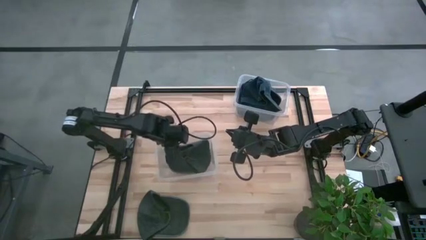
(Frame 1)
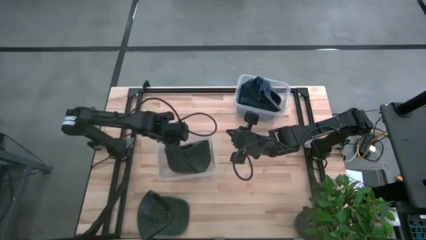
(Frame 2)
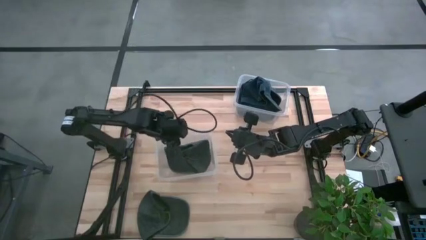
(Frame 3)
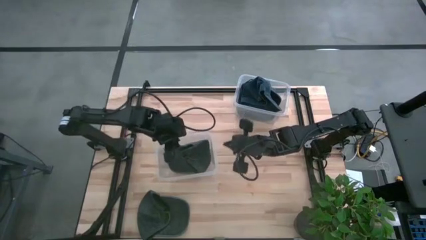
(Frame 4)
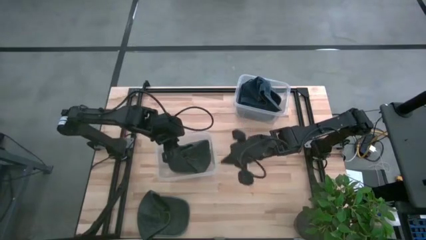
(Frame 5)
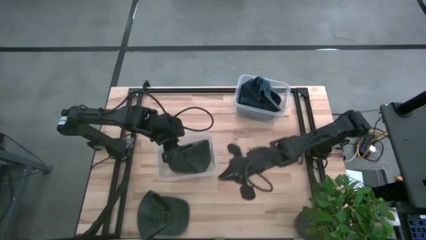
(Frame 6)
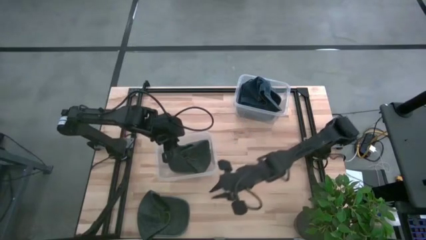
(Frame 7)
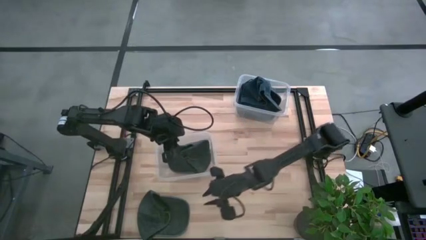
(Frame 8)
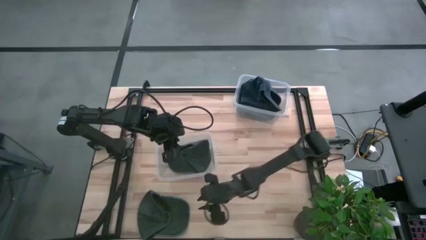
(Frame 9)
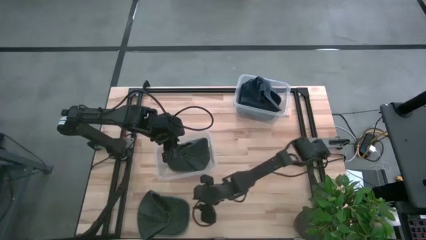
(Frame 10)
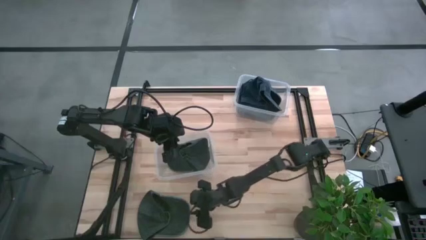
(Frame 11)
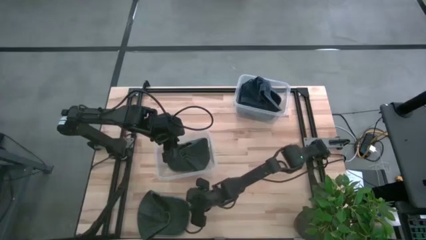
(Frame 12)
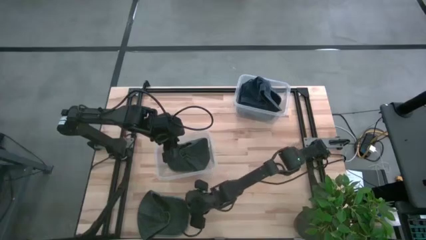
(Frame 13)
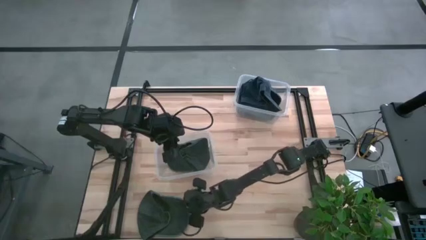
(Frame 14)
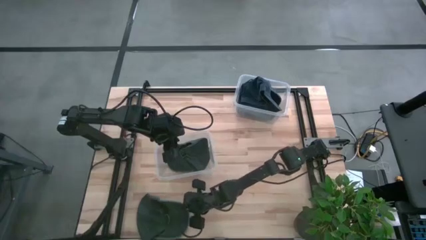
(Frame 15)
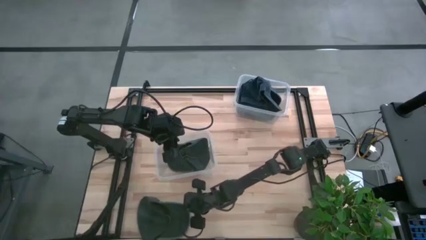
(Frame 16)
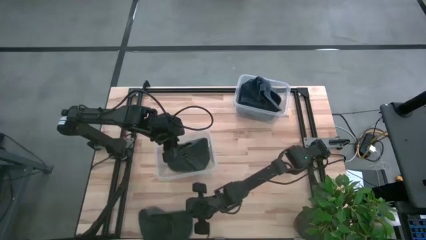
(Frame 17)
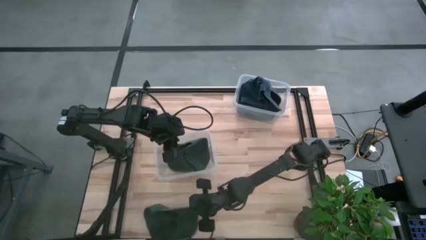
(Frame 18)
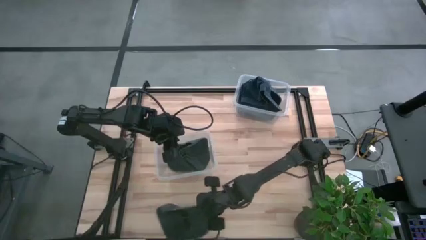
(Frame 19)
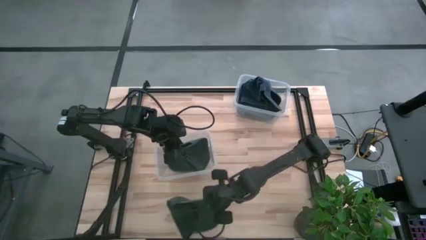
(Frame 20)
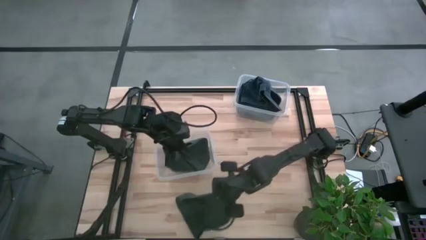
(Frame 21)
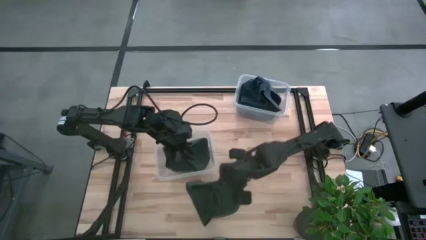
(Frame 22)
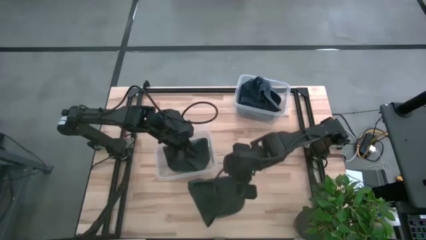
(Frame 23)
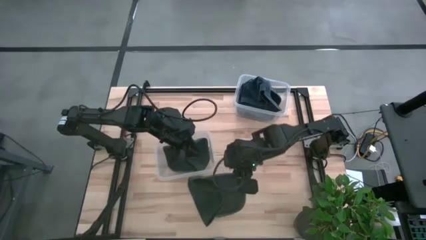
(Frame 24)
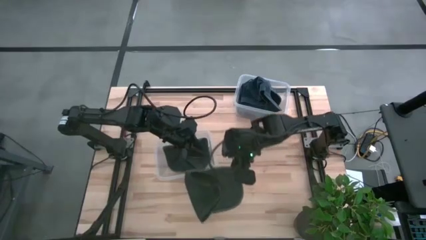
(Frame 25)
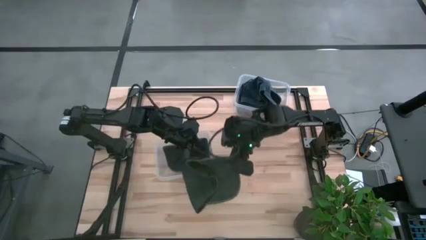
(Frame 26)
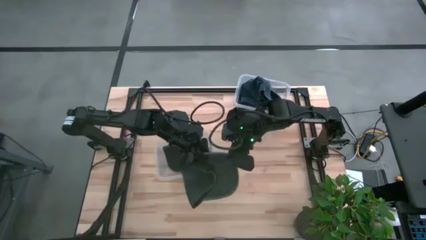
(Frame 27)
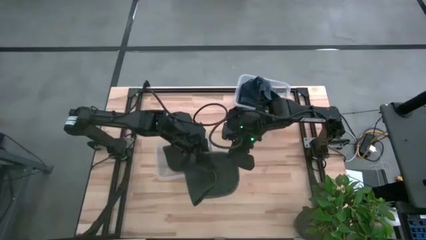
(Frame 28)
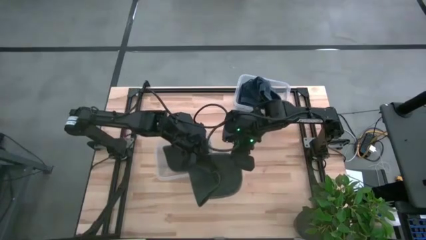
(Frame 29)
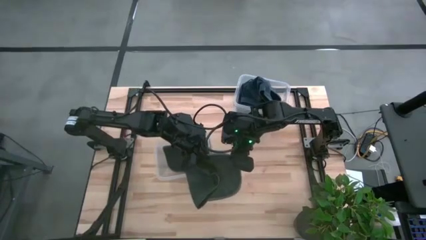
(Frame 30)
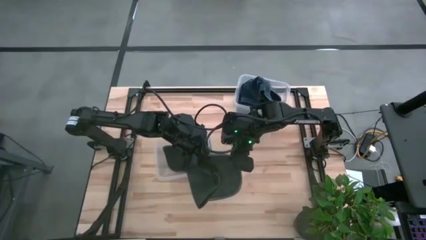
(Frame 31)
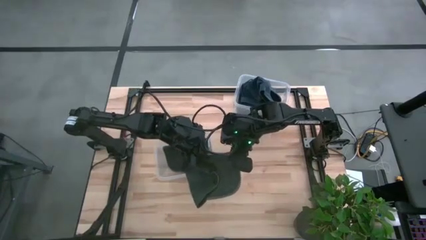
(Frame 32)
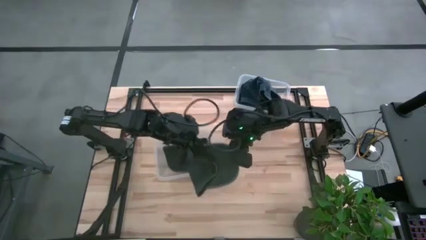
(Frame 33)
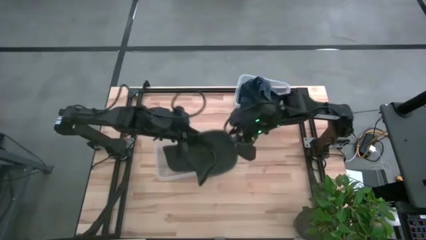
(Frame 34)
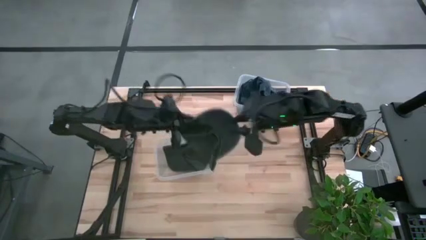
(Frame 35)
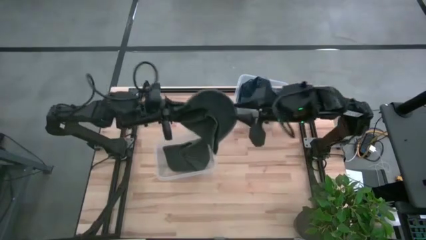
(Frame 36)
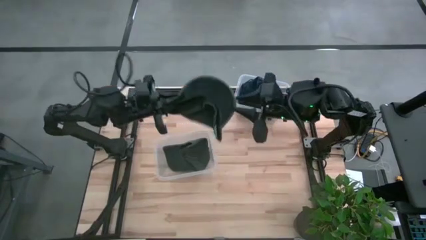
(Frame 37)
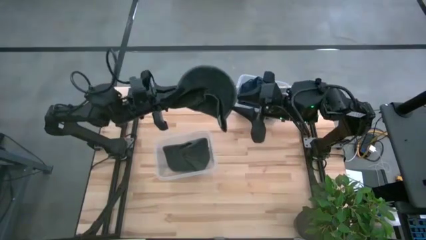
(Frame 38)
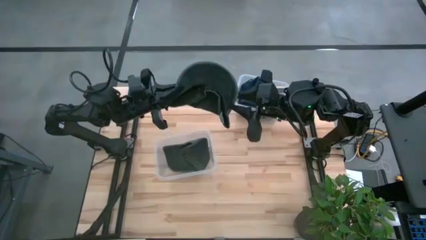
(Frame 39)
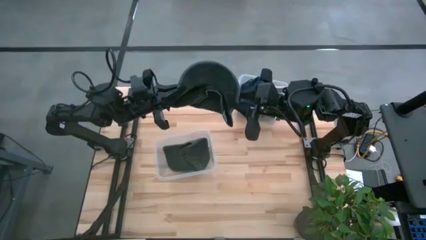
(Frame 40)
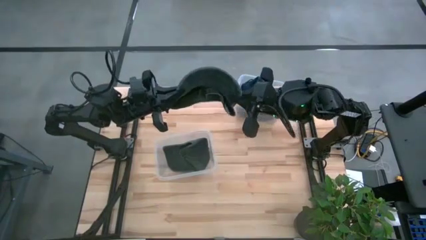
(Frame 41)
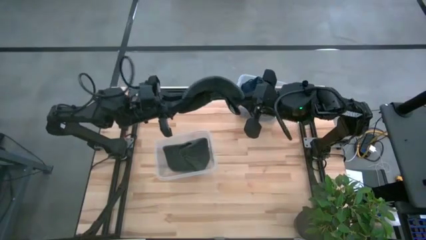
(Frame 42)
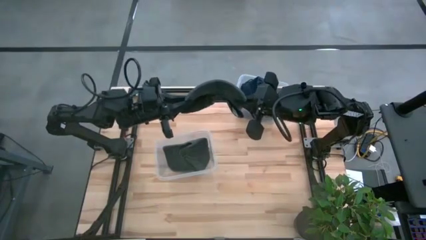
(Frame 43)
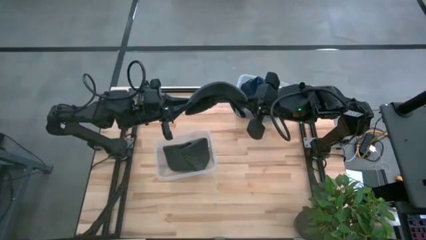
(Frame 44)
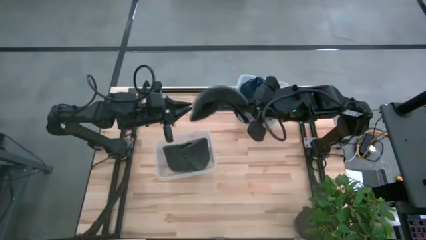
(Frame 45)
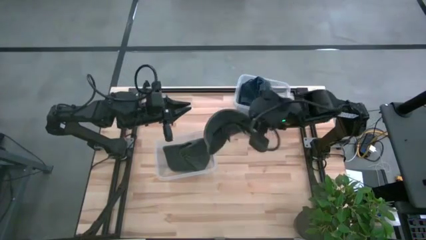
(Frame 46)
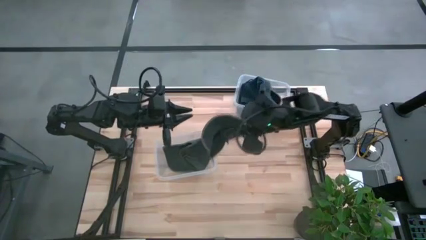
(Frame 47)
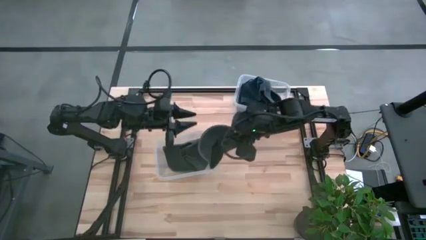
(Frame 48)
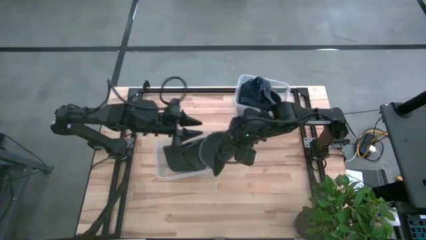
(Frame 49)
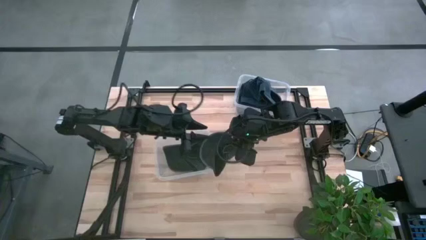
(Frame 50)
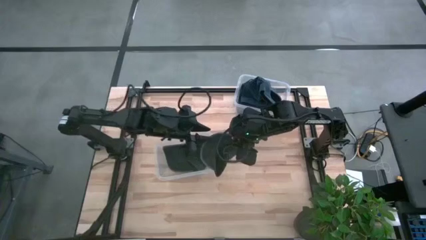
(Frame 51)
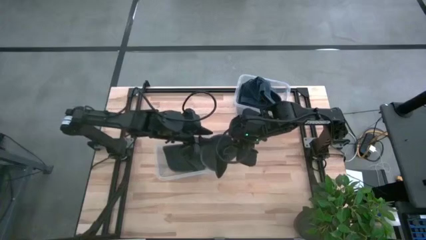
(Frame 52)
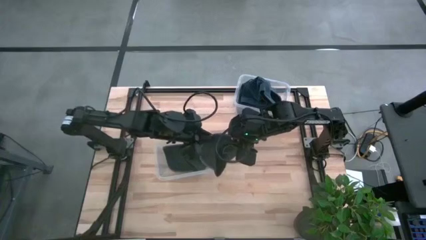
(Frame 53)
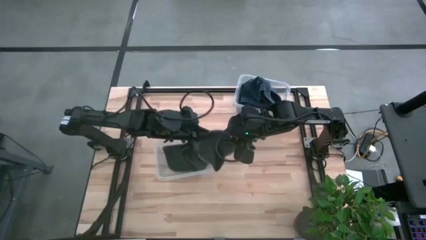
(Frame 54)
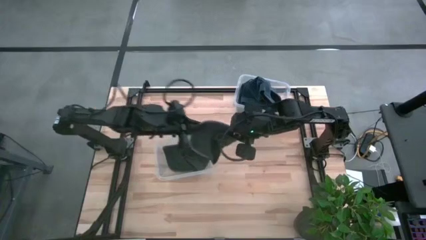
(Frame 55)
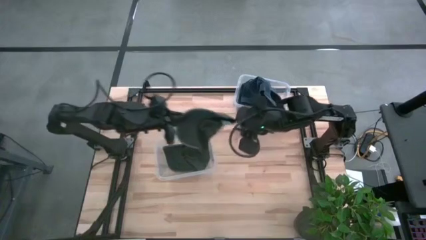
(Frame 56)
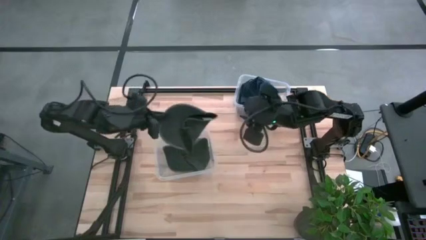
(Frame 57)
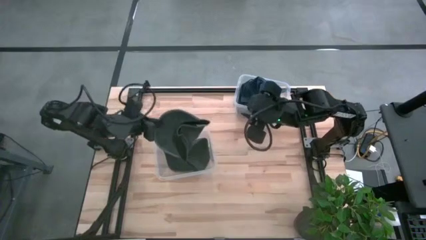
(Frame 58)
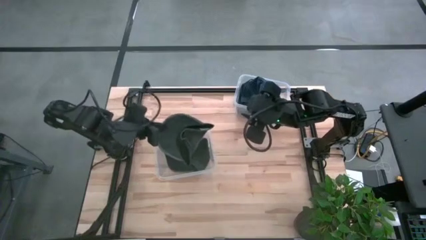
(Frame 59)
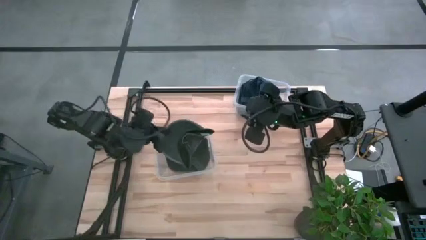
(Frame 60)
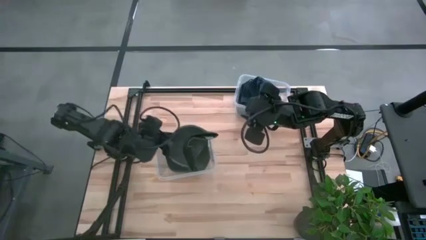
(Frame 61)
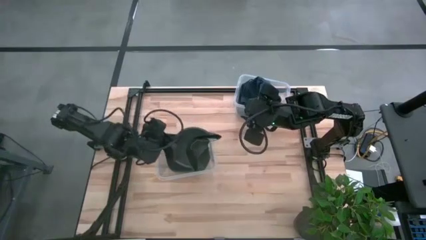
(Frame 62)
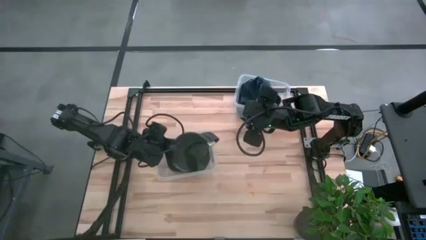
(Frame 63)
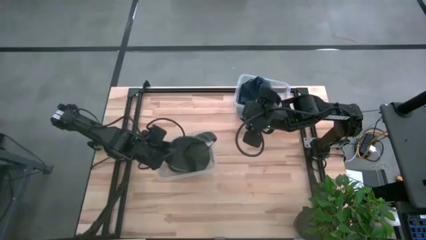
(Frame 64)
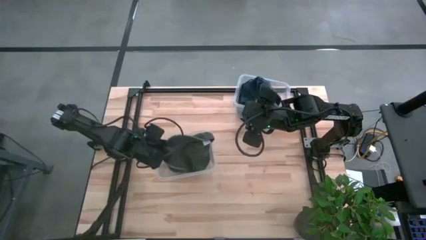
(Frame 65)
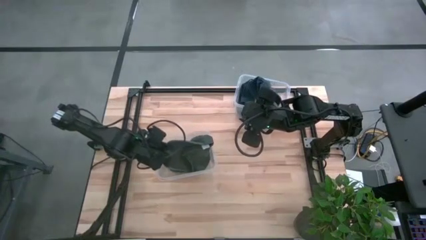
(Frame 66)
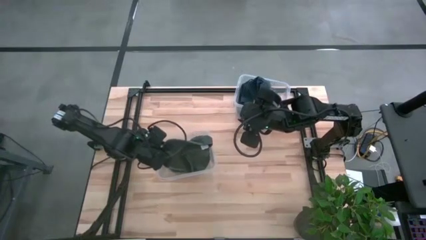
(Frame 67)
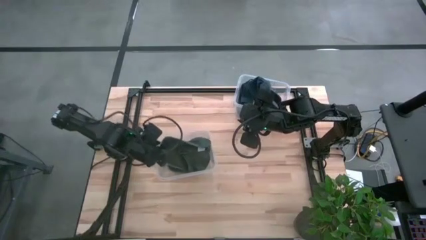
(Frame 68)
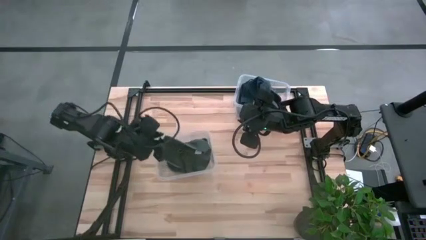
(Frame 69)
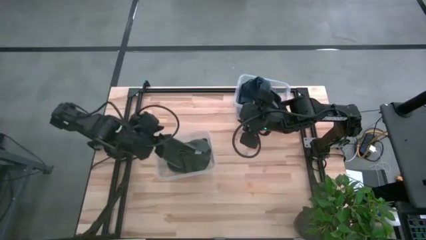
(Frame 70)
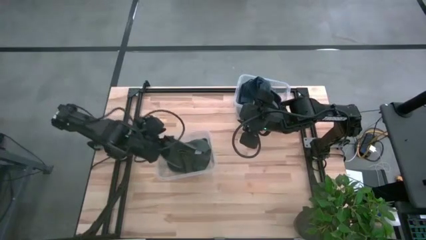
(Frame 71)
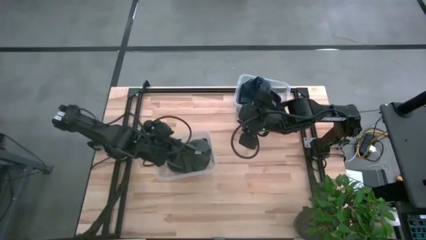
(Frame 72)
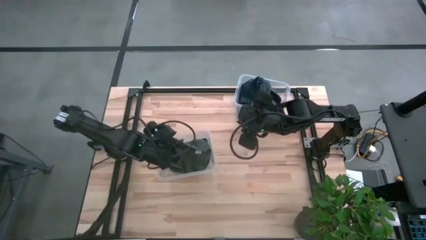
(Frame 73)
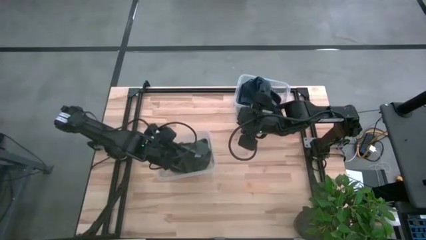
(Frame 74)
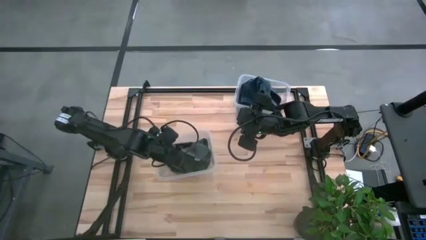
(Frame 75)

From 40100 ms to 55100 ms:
Task: Pick & Place hat
Put the green cap into the bottom transparent bin
